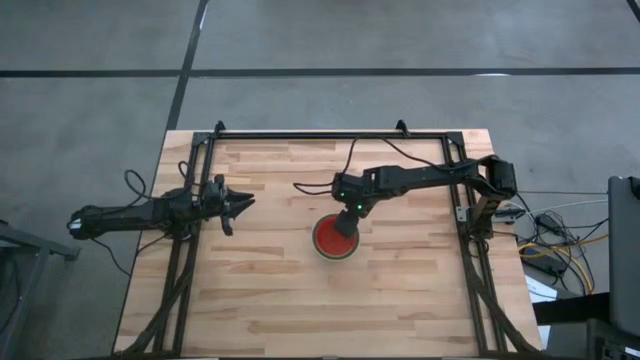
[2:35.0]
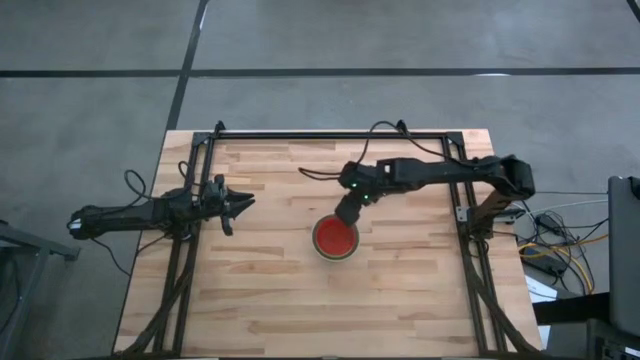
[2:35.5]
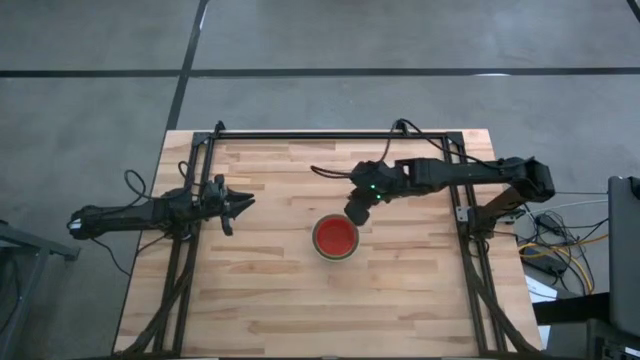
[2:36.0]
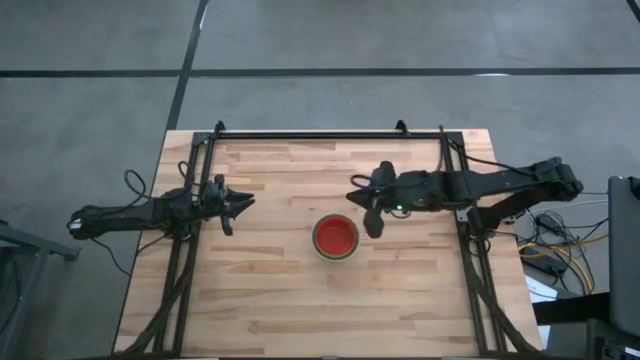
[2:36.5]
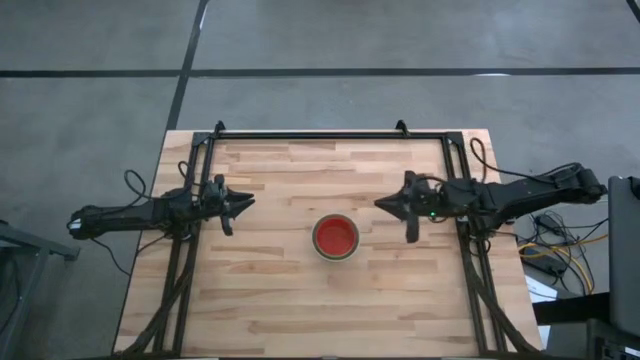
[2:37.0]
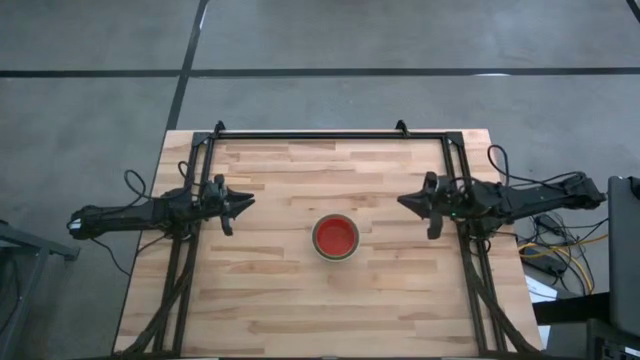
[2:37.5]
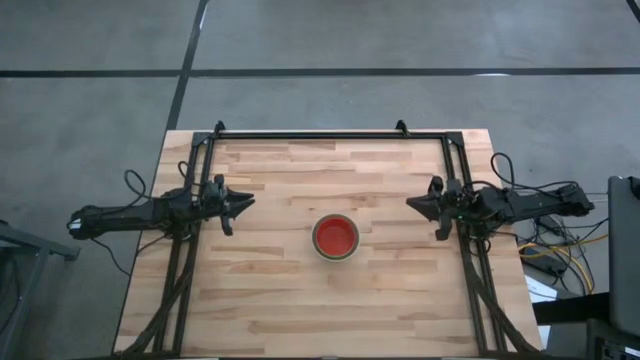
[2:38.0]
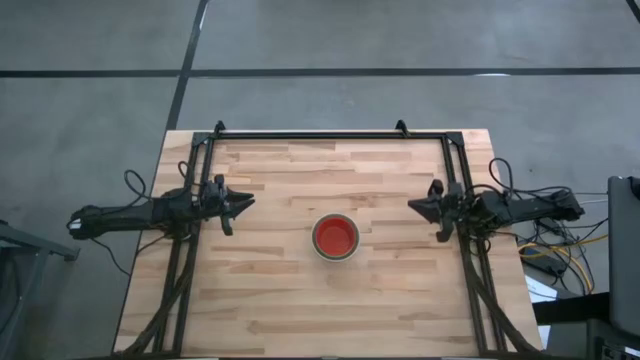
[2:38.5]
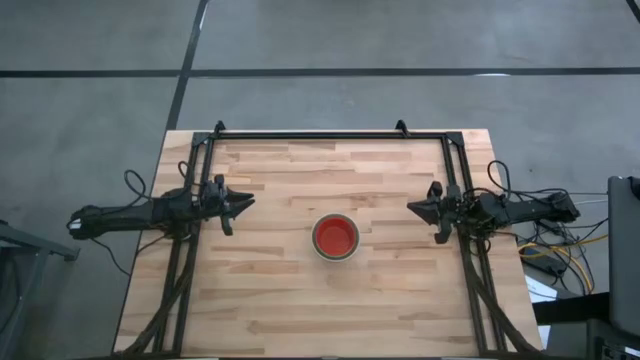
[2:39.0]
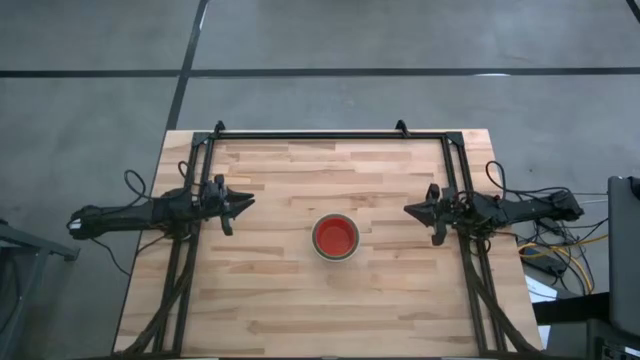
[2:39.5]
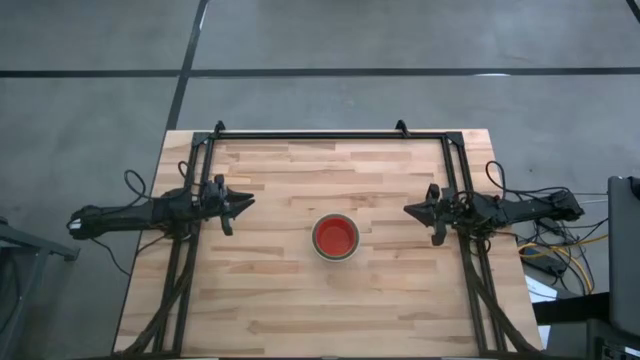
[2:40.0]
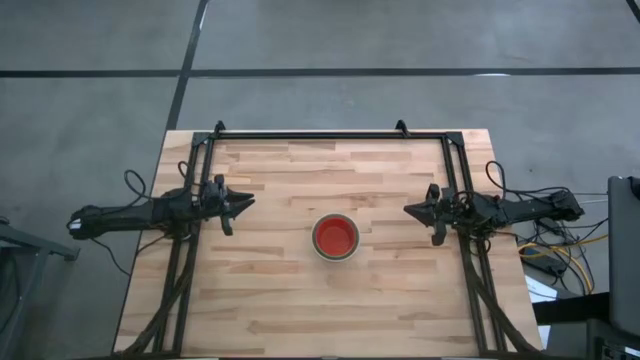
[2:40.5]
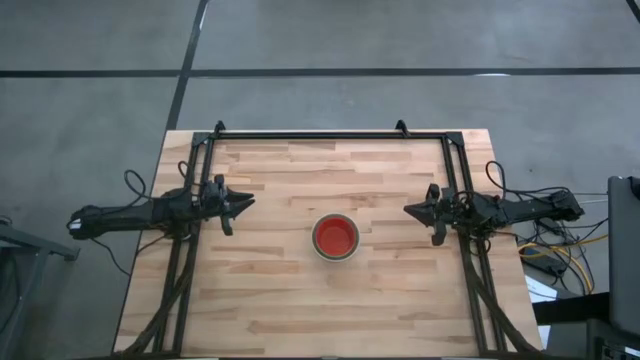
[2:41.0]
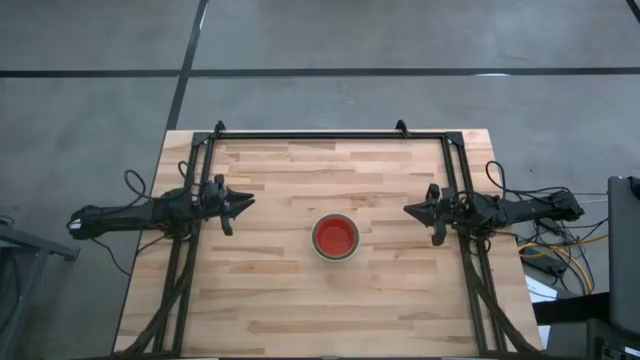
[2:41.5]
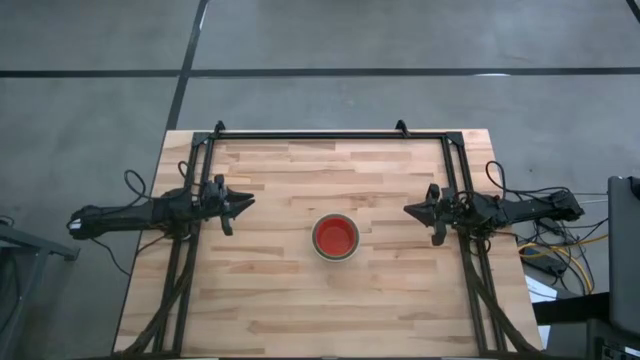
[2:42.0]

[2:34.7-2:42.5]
Return to Home Position

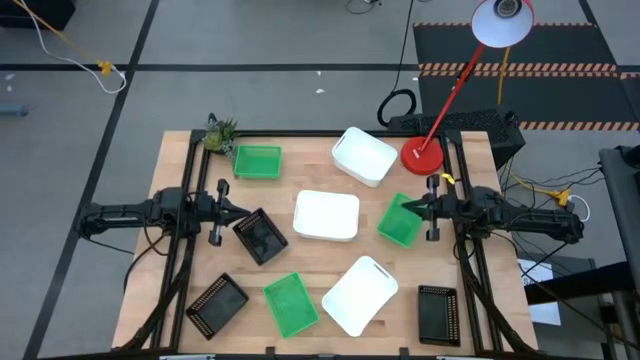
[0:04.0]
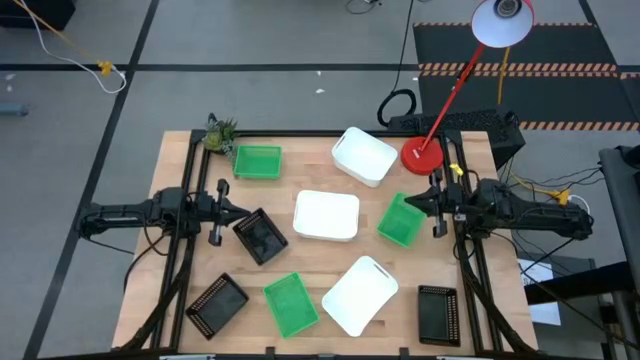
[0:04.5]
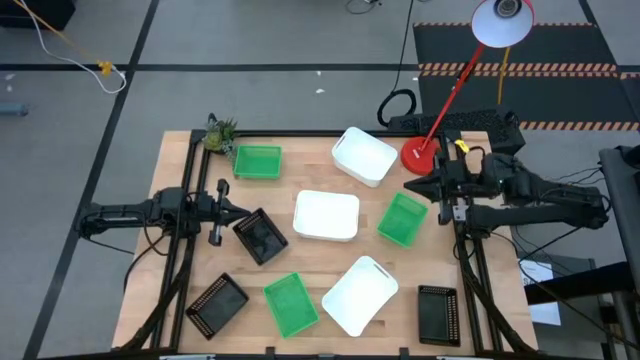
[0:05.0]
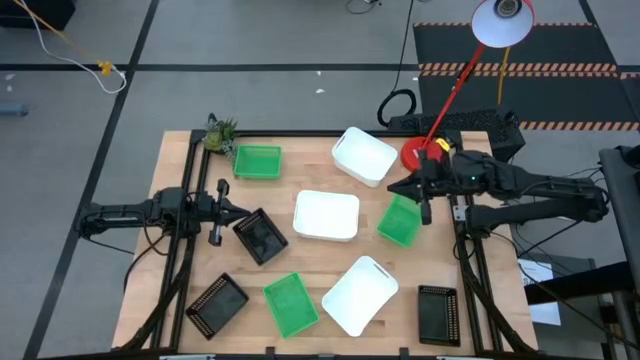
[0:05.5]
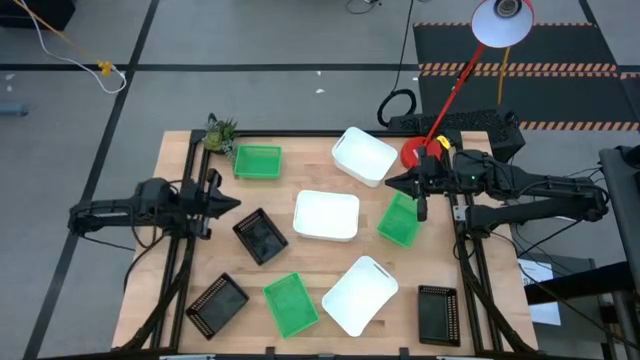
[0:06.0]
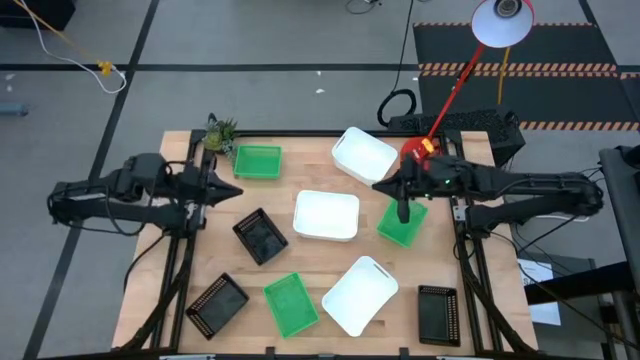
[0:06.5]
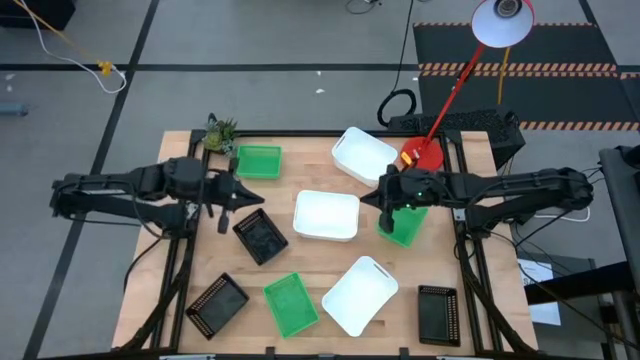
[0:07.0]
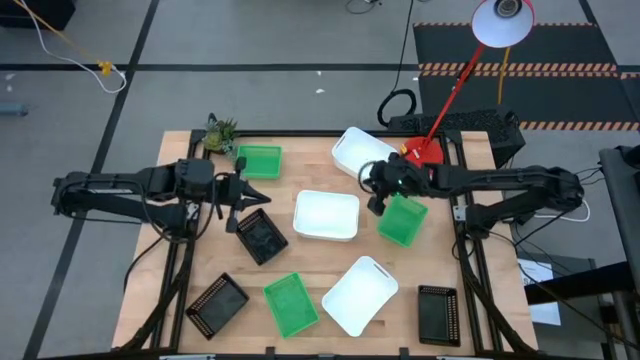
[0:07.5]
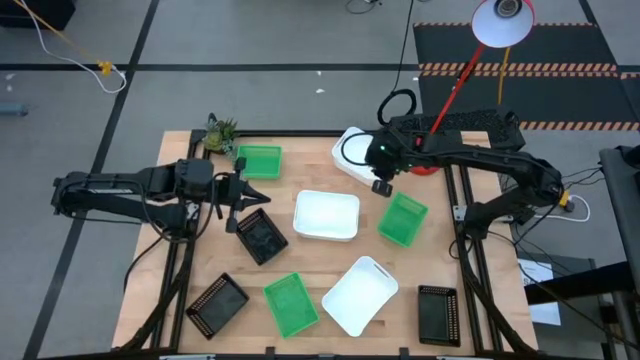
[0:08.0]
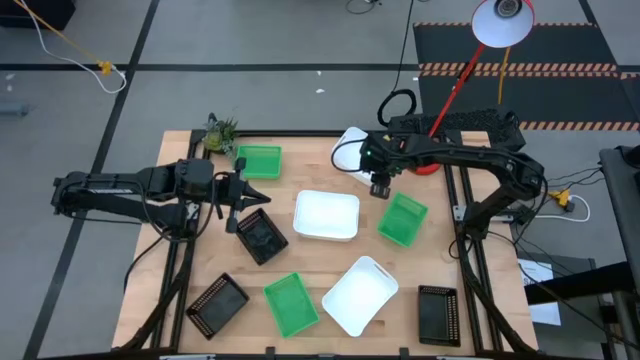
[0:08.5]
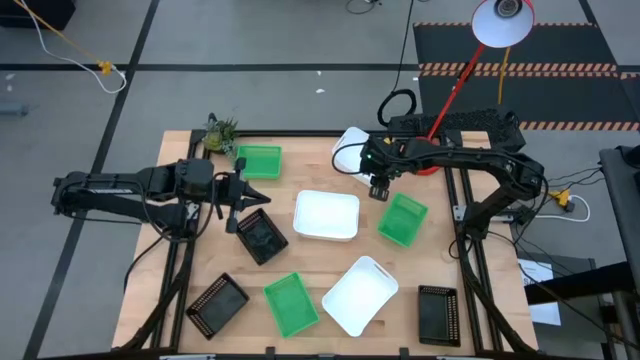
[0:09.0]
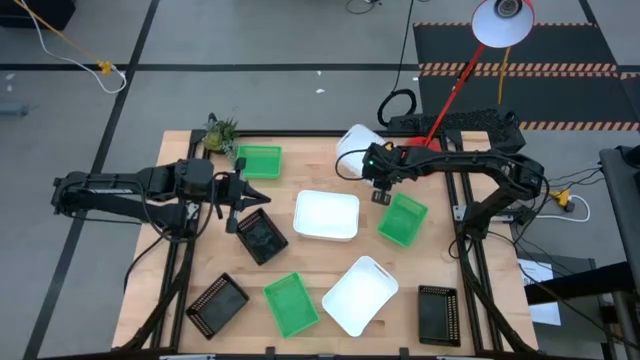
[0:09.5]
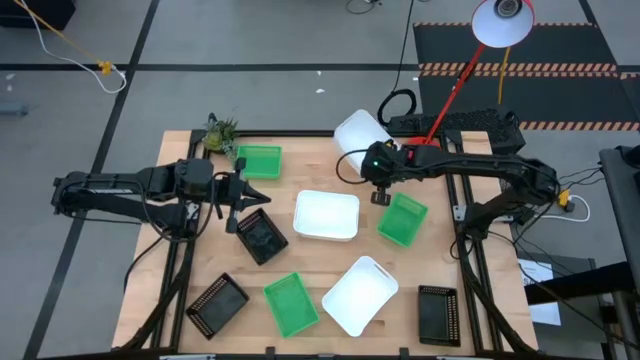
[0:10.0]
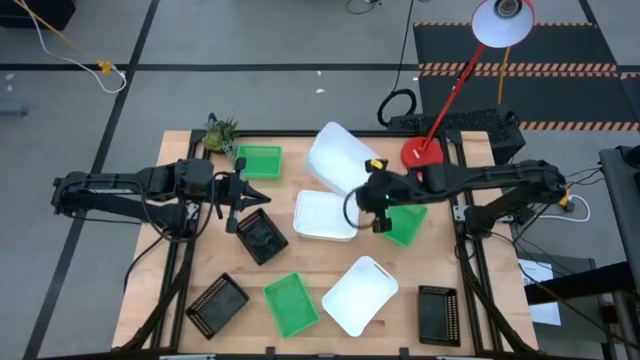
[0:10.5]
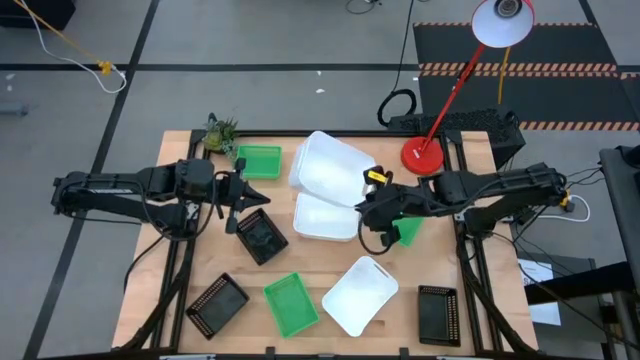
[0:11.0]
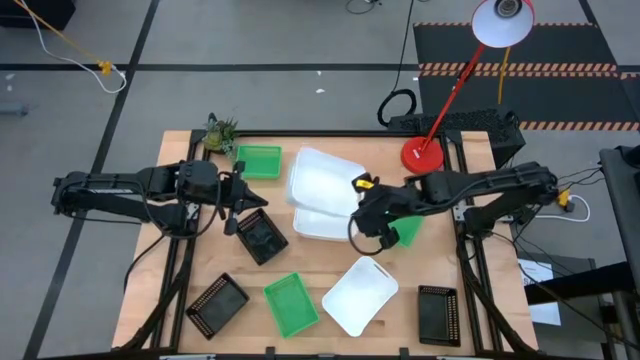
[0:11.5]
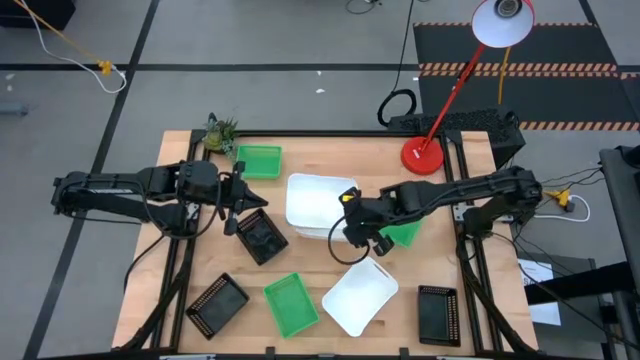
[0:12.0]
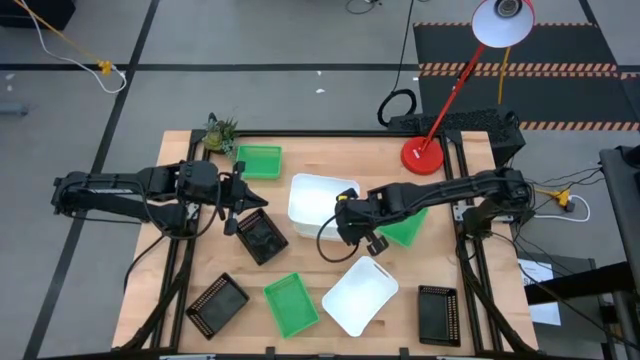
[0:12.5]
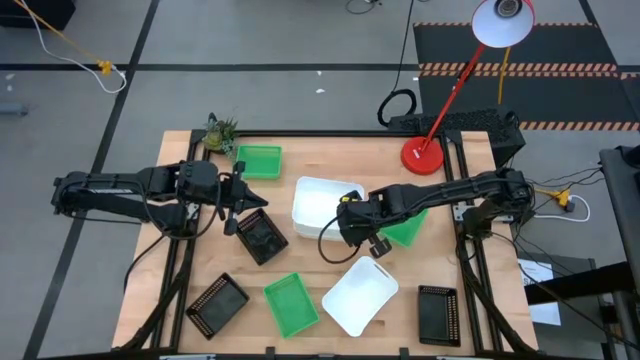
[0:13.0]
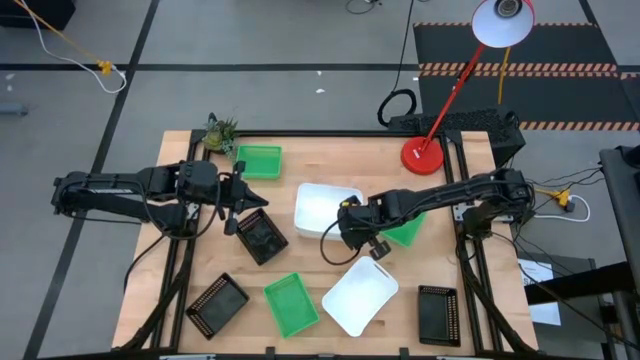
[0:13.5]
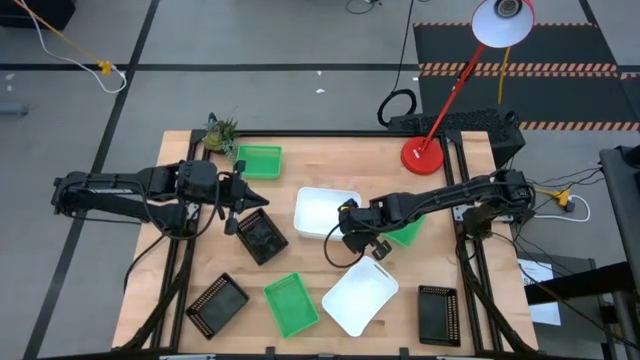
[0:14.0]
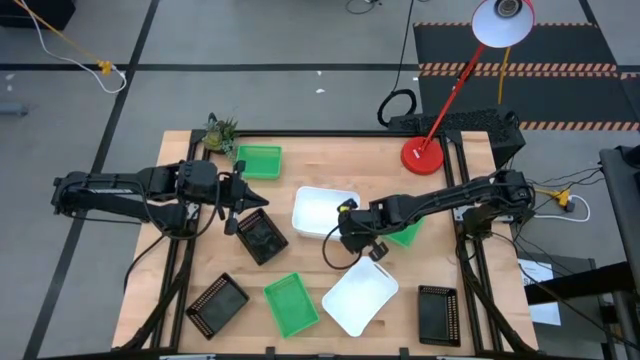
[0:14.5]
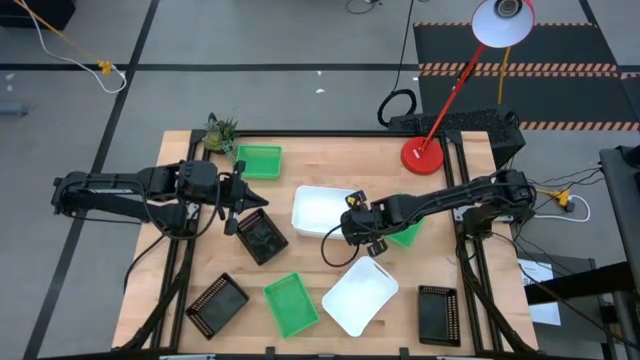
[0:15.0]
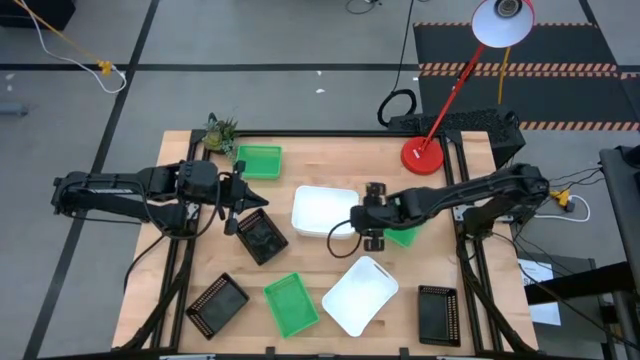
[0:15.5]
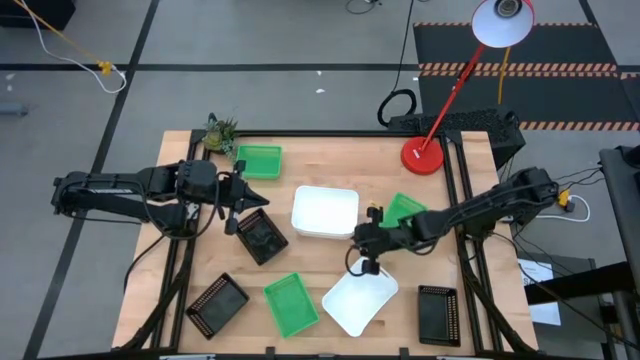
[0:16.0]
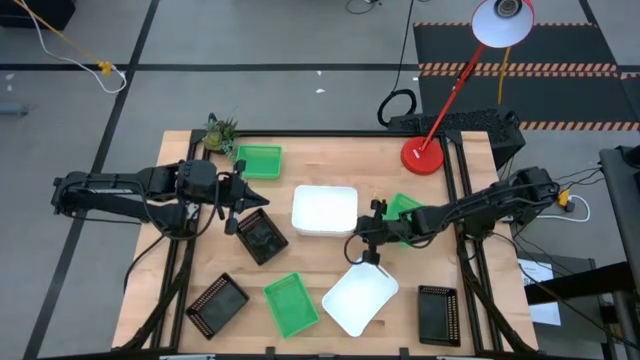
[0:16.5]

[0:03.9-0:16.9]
Stack the top white bin on top of the middle white bin
